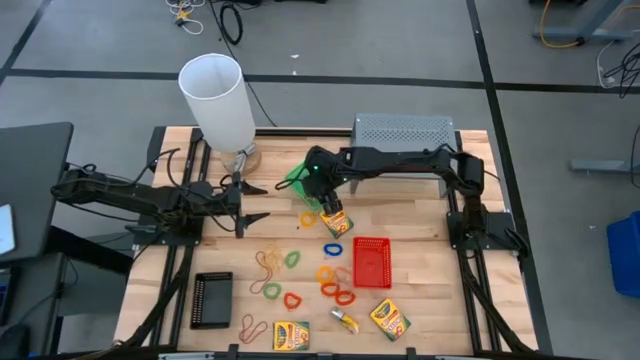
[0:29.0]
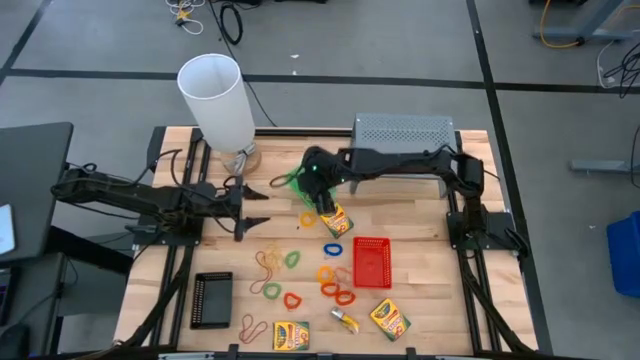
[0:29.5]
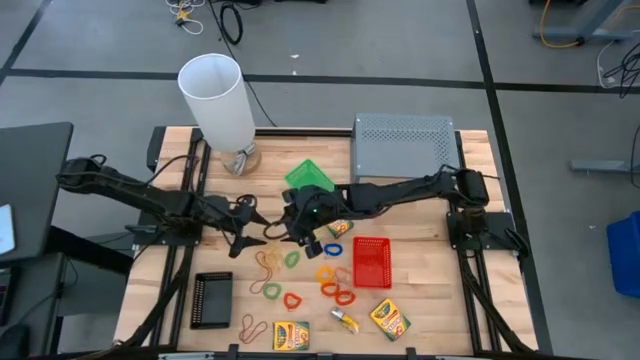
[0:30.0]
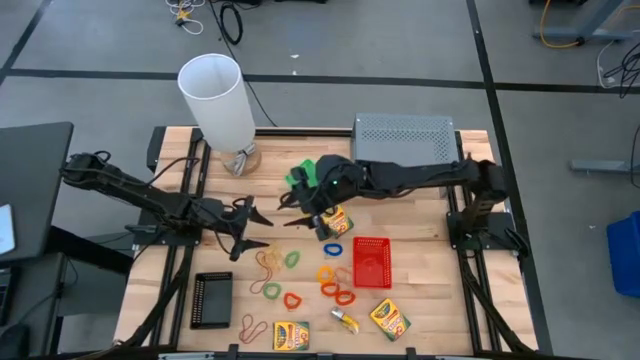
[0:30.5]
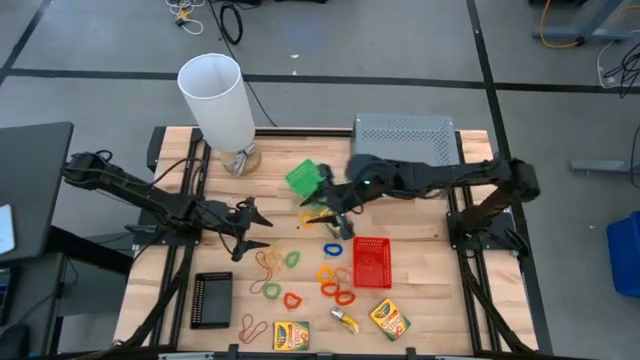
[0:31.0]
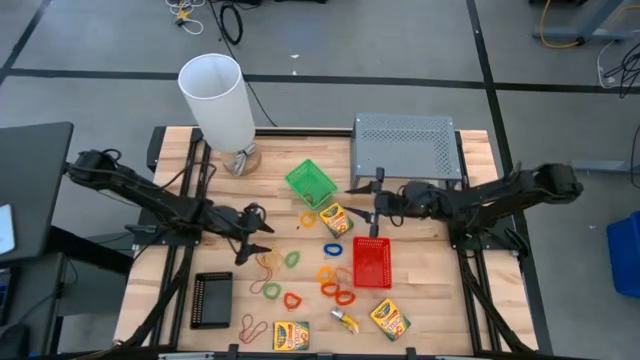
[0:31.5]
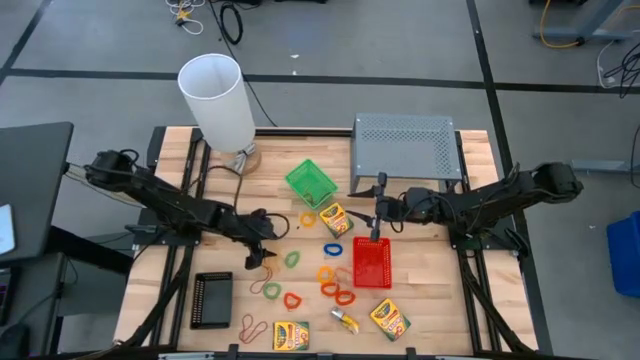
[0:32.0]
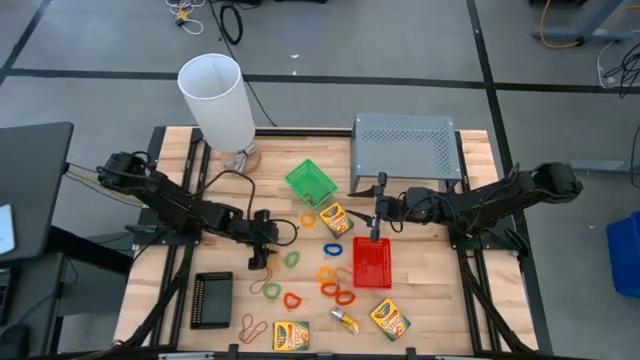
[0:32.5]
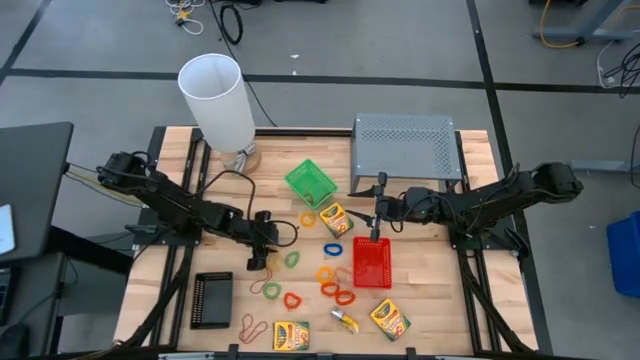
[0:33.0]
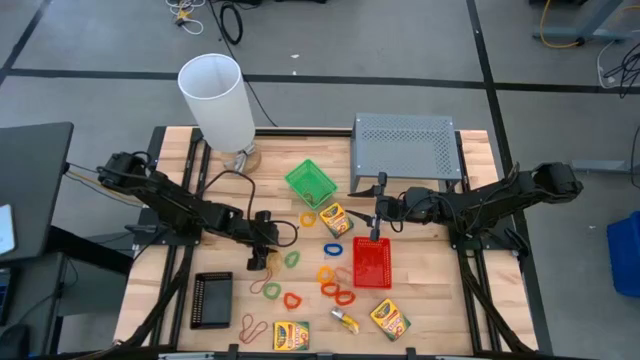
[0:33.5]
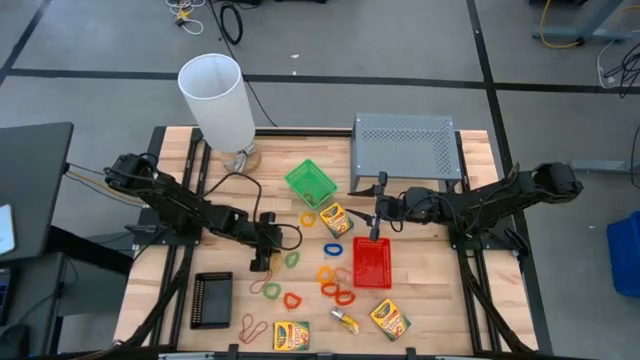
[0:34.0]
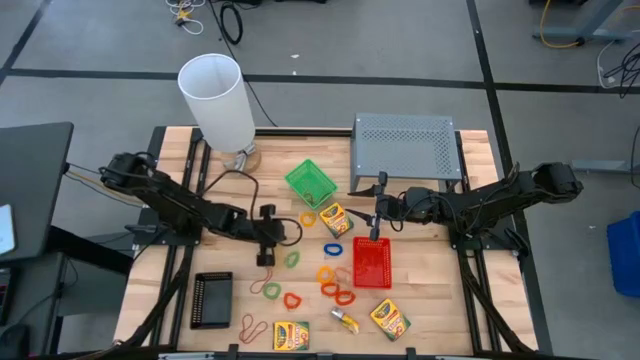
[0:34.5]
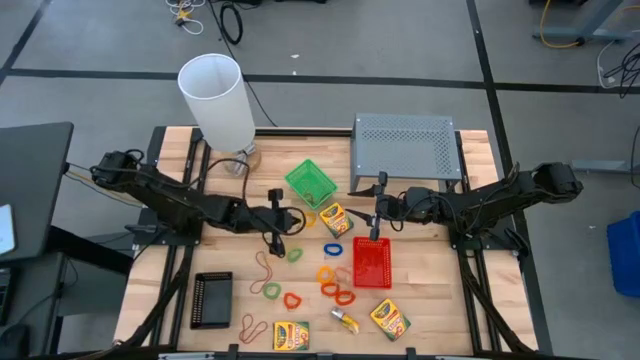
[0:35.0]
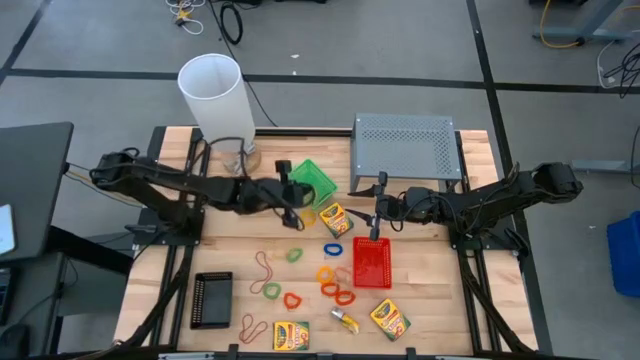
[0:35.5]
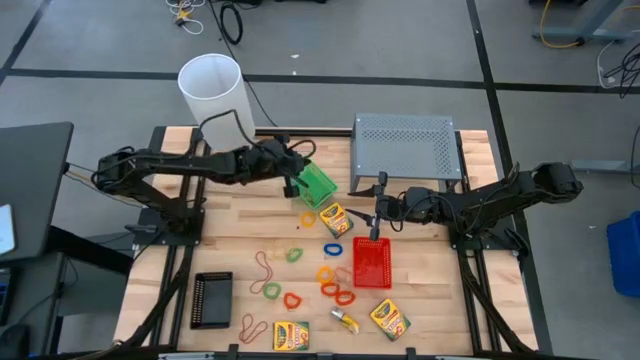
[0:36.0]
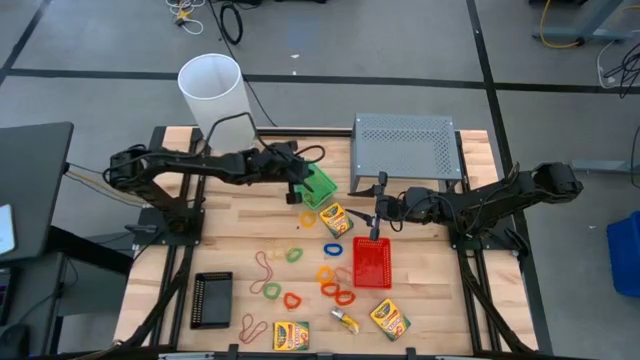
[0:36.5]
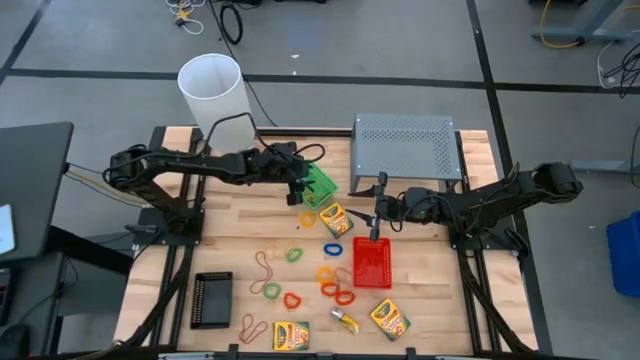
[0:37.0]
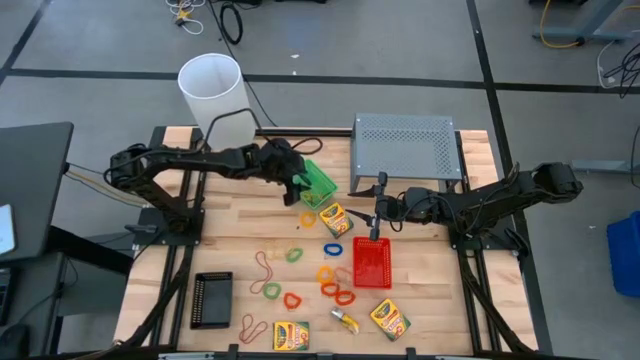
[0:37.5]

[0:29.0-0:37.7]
Task: Pick & Place Office Desk Supplies
Put the yellow rubber band into the green bin

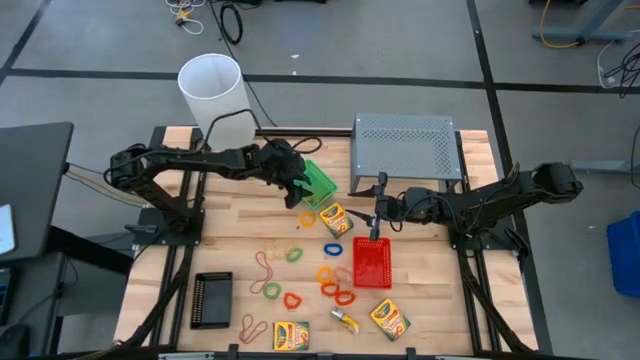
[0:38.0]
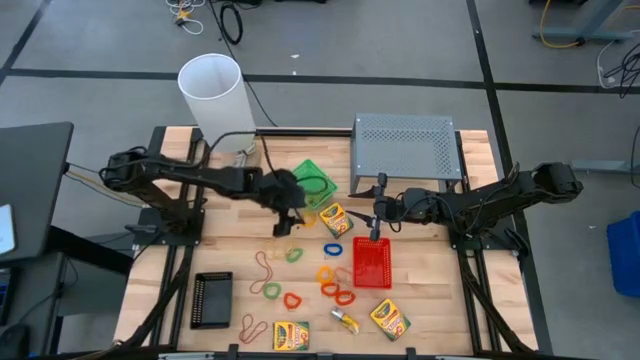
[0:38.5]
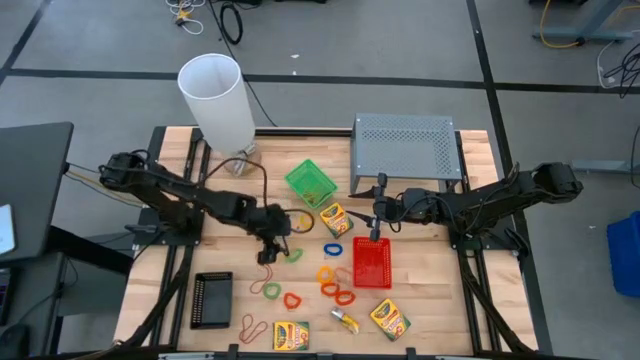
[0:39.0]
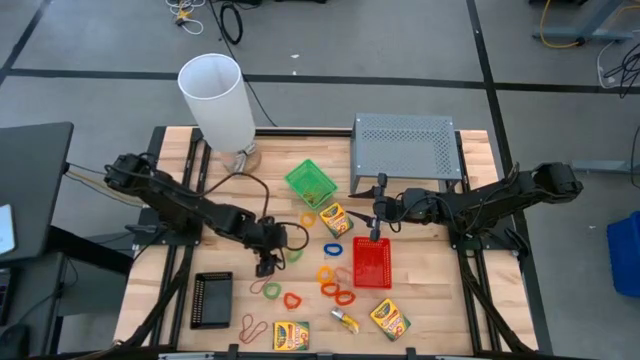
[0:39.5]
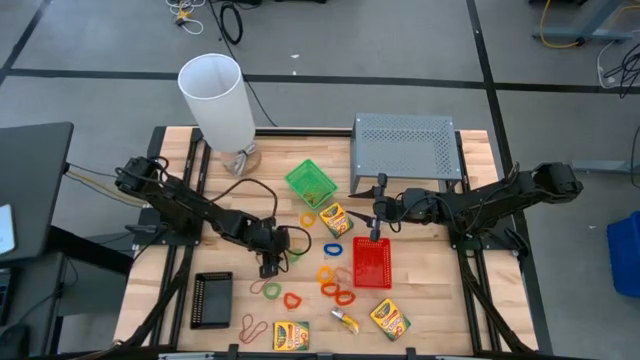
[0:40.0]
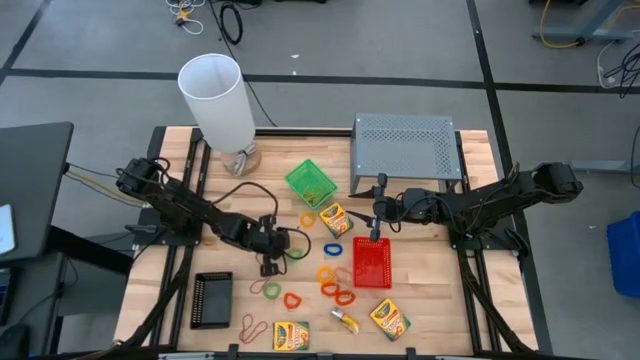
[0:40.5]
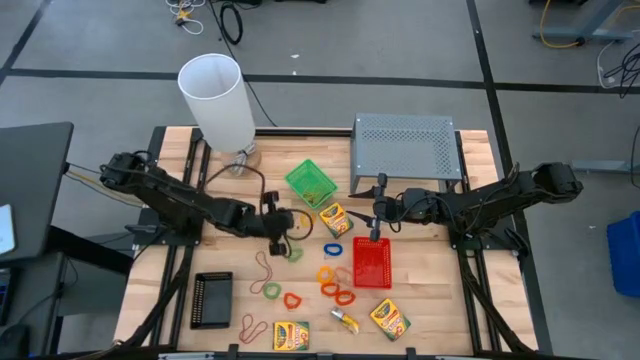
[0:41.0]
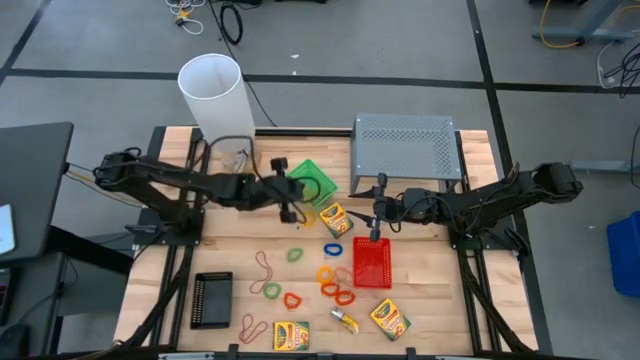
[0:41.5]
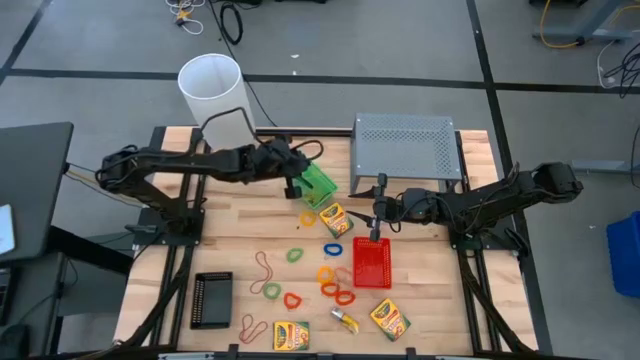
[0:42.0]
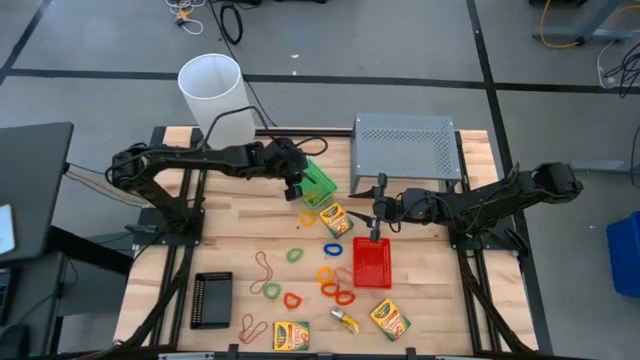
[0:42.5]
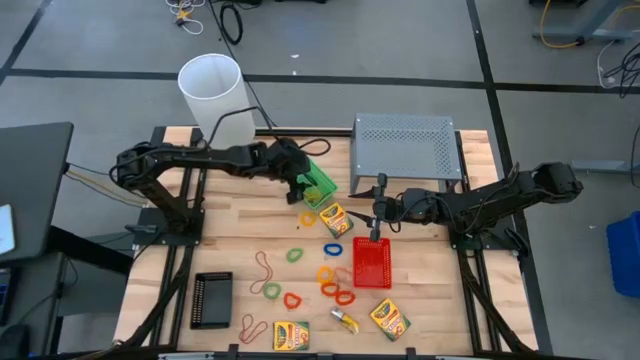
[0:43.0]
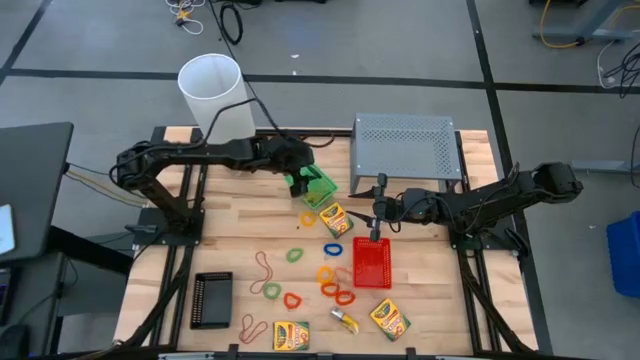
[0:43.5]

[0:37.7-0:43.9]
Put the yellow rubber band into the green bin

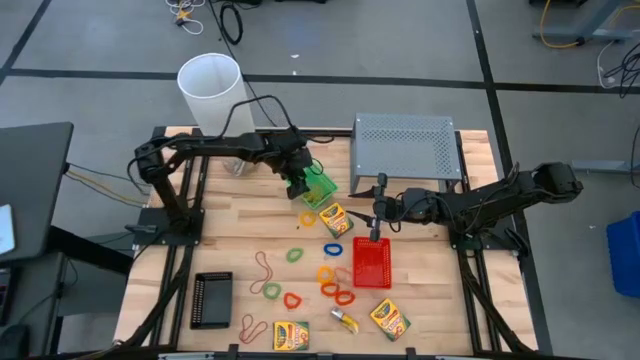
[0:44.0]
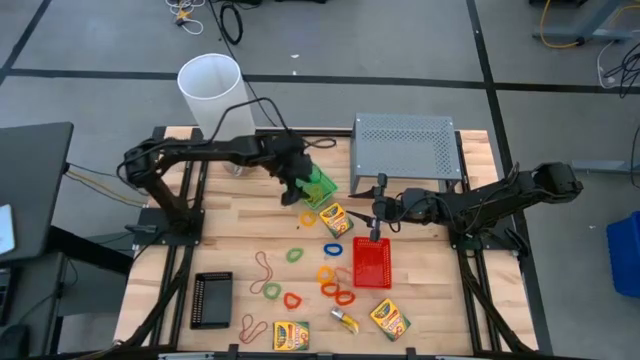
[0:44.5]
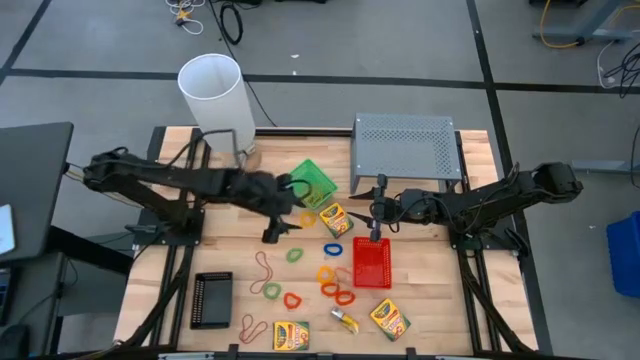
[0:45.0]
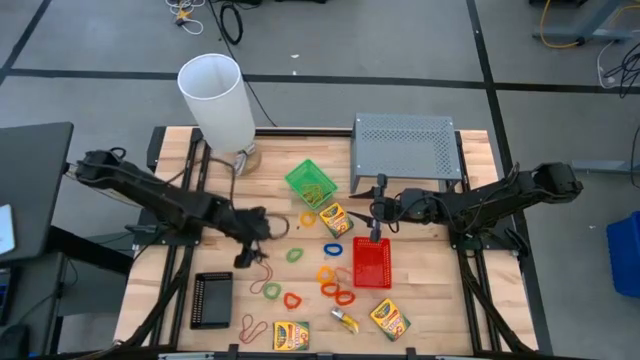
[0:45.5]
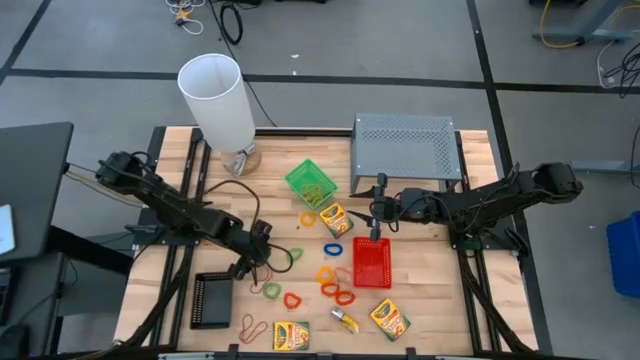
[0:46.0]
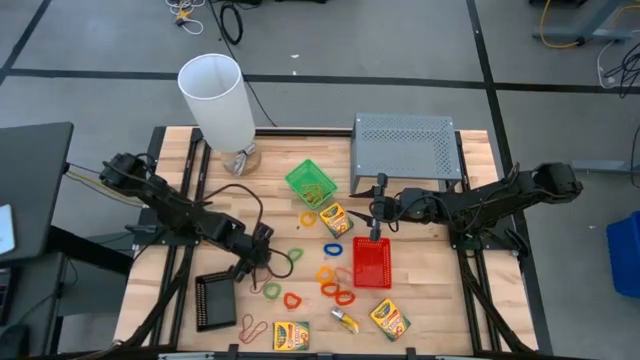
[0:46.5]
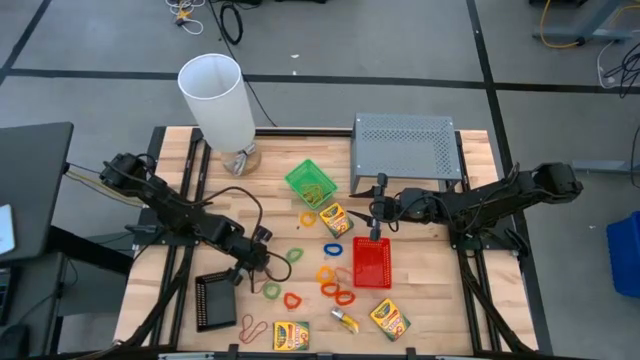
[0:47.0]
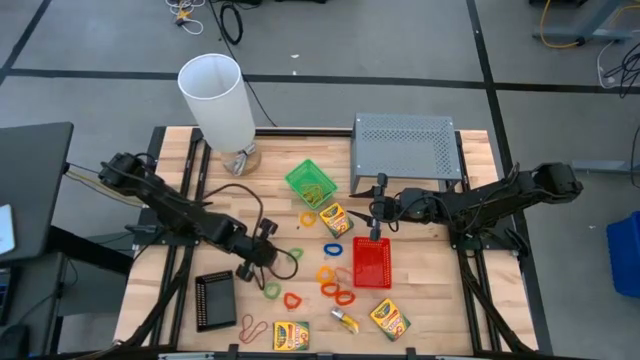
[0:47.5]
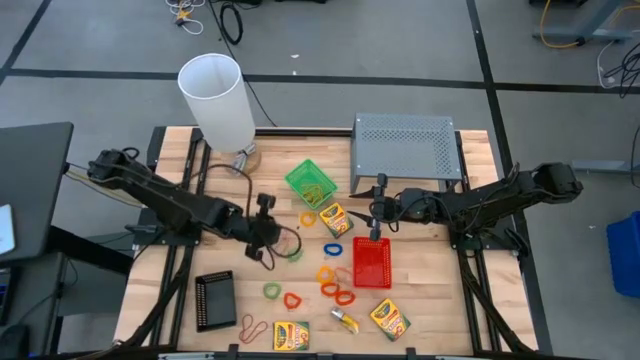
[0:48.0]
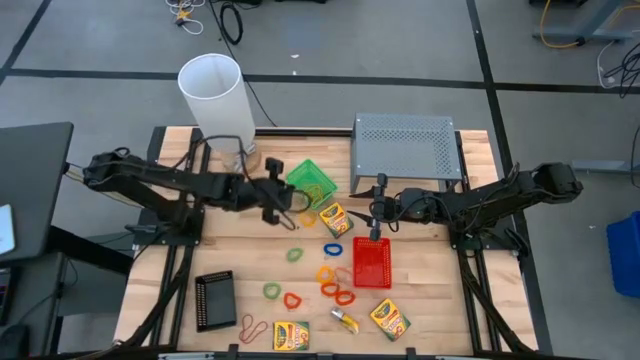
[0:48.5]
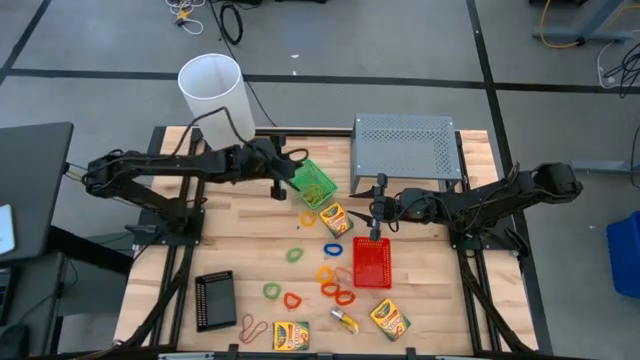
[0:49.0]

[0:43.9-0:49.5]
Put the red rubber band into the green bin

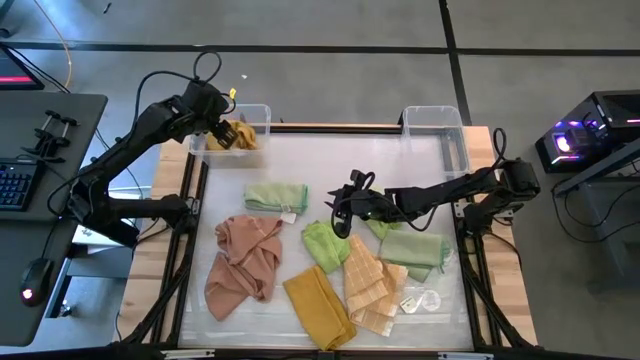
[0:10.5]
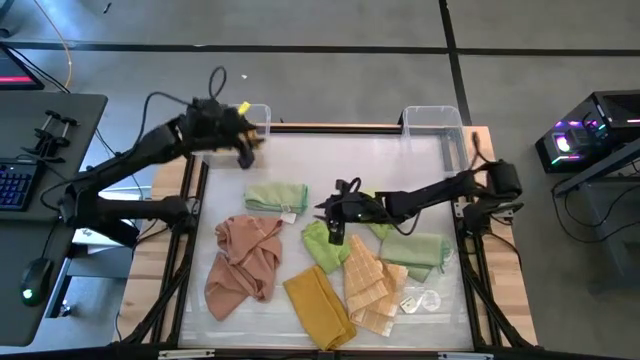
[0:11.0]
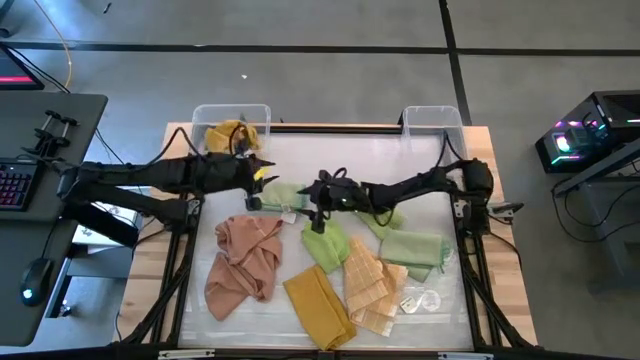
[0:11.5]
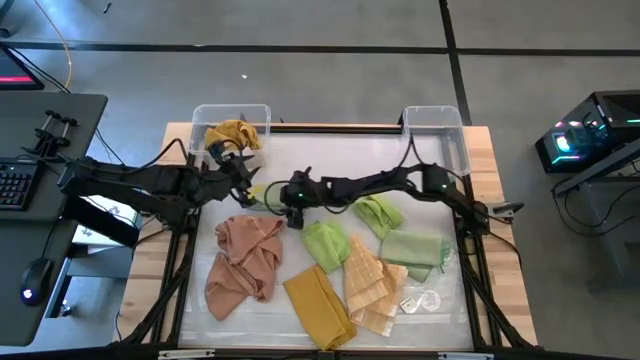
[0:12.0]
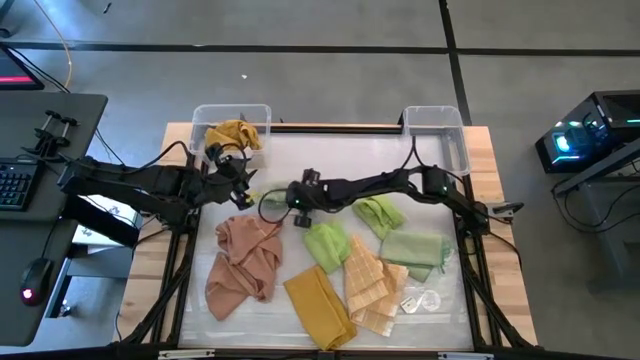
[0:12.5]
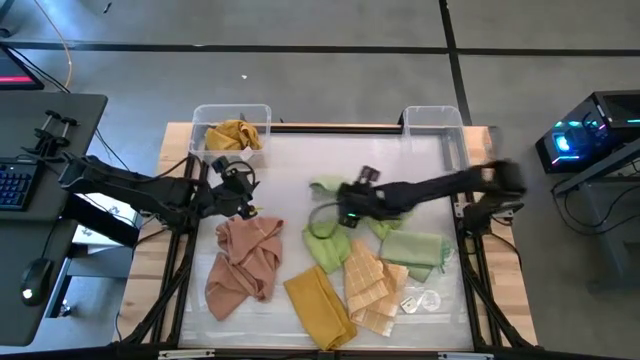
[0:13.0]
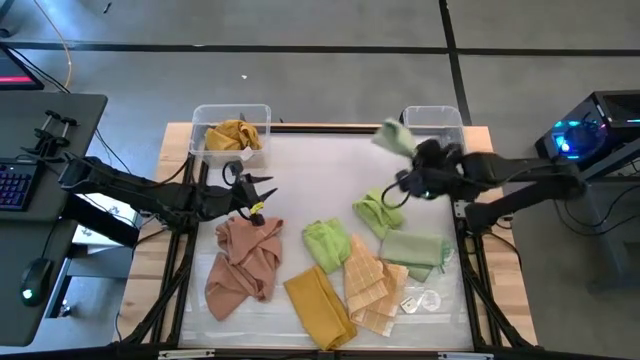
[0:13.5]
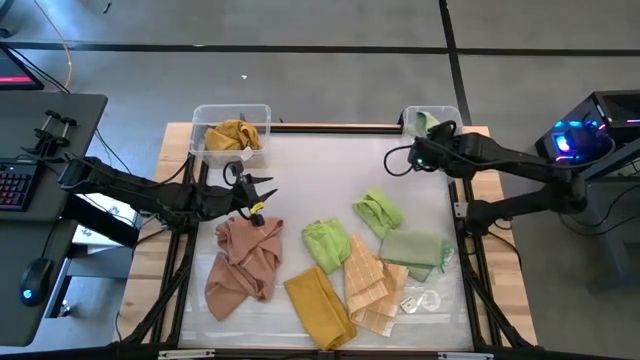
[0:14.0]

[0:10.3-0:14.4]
Task: Sort towels by color in basket
Put the top light green microfiber cloth into the right transparent bin
